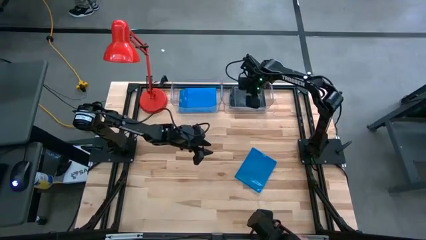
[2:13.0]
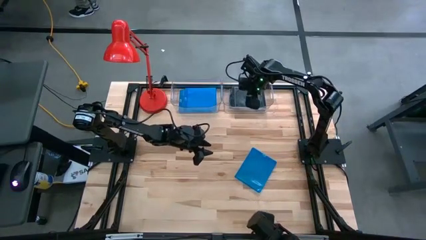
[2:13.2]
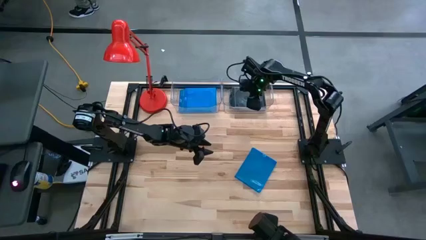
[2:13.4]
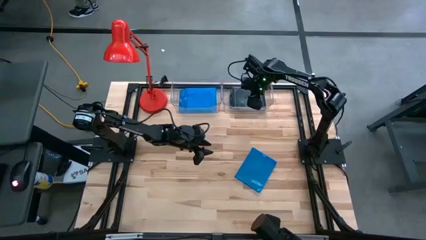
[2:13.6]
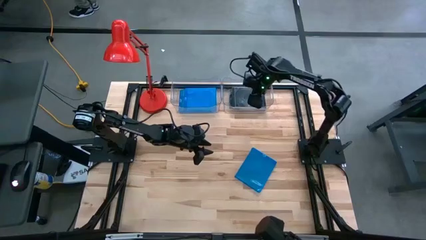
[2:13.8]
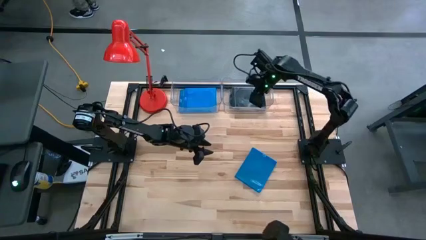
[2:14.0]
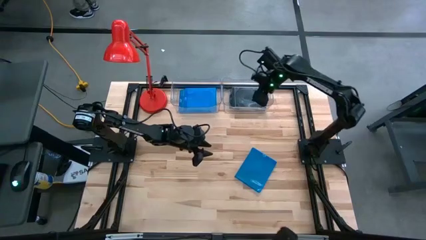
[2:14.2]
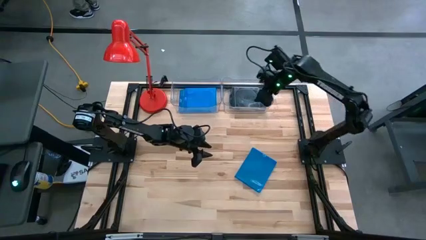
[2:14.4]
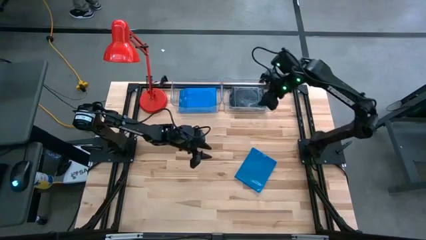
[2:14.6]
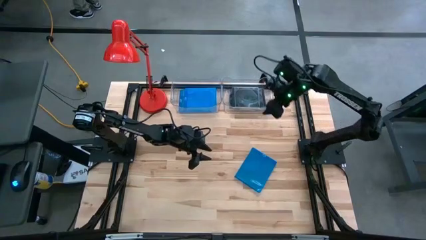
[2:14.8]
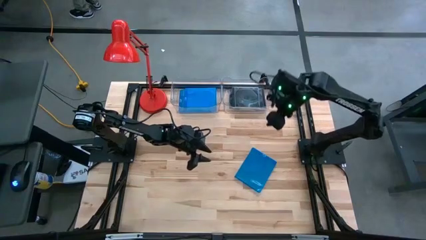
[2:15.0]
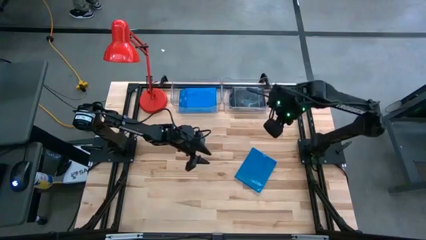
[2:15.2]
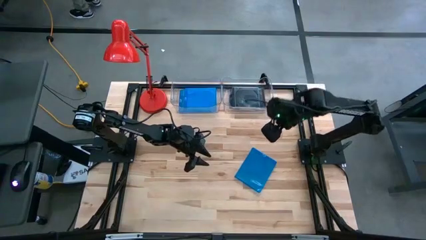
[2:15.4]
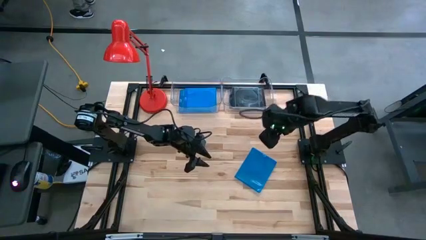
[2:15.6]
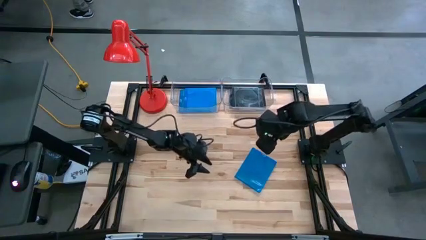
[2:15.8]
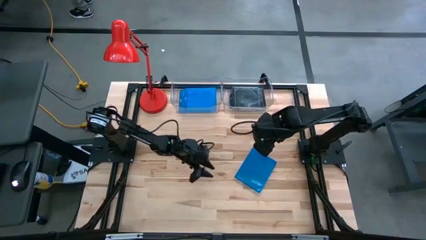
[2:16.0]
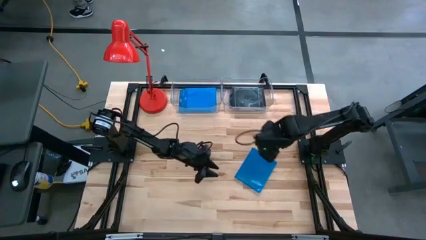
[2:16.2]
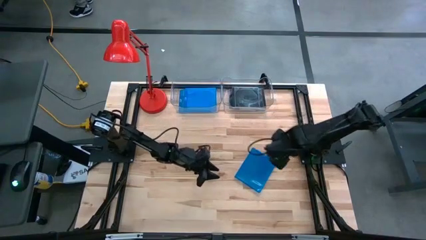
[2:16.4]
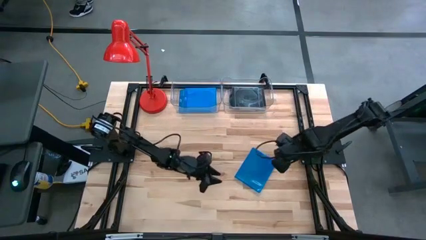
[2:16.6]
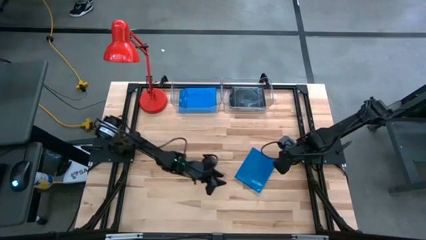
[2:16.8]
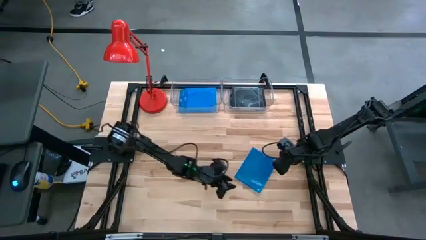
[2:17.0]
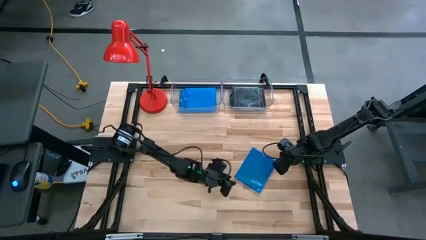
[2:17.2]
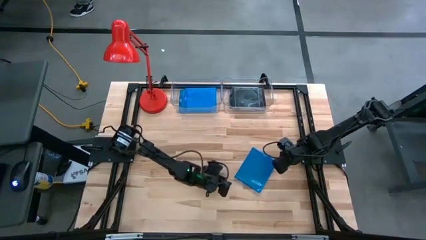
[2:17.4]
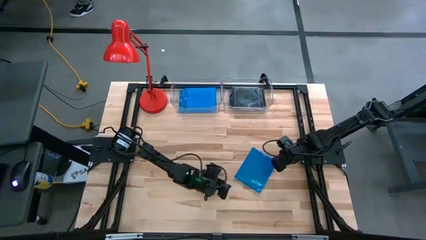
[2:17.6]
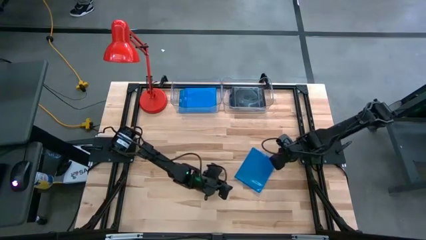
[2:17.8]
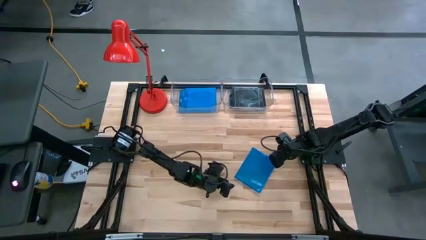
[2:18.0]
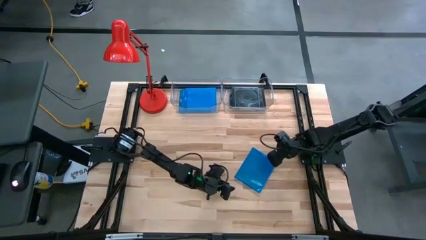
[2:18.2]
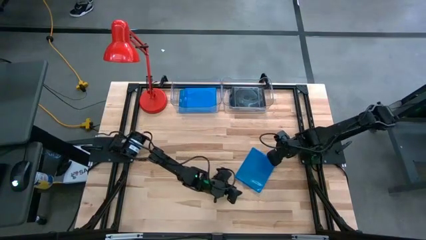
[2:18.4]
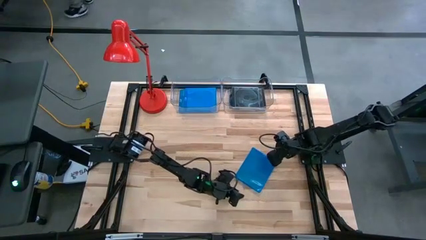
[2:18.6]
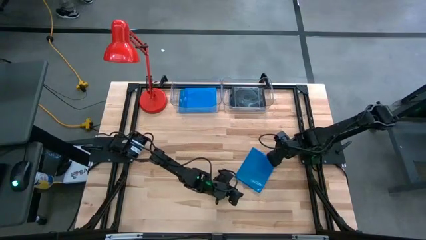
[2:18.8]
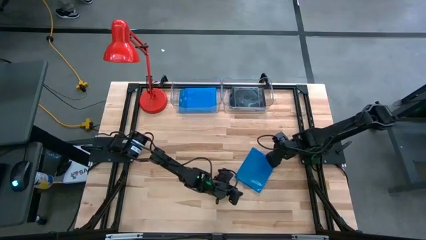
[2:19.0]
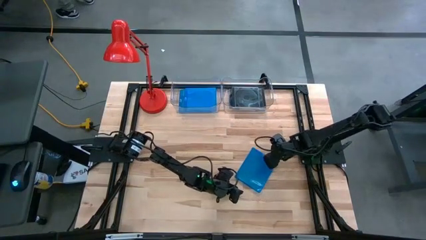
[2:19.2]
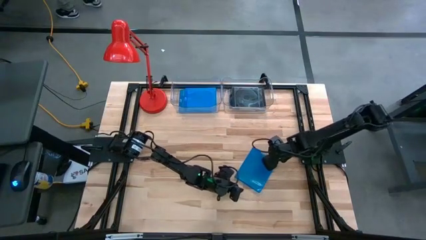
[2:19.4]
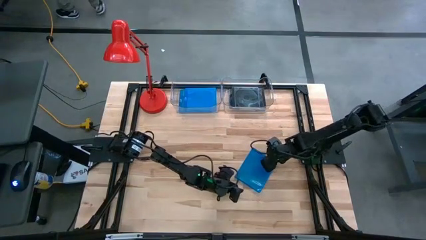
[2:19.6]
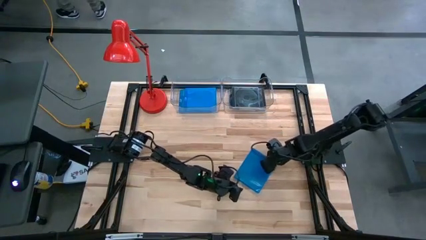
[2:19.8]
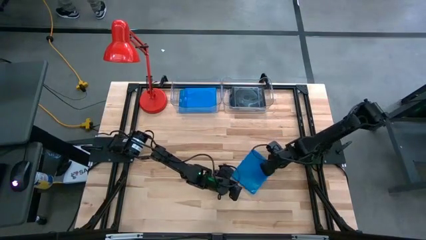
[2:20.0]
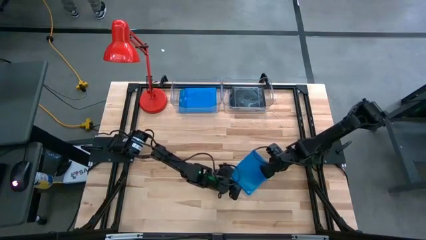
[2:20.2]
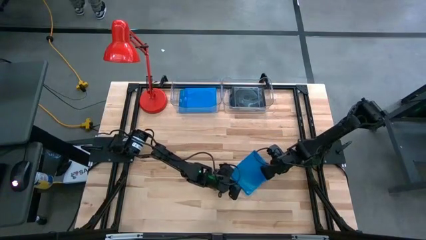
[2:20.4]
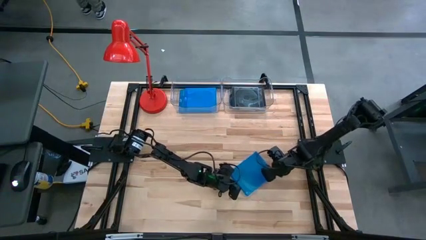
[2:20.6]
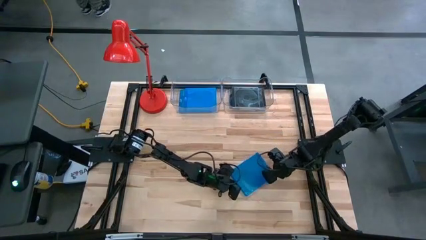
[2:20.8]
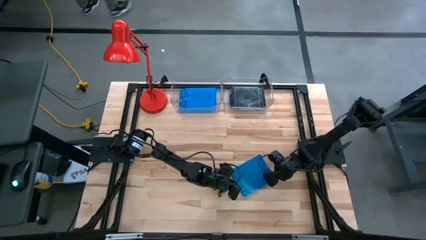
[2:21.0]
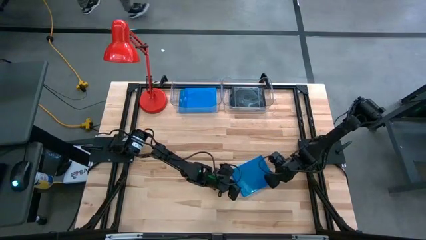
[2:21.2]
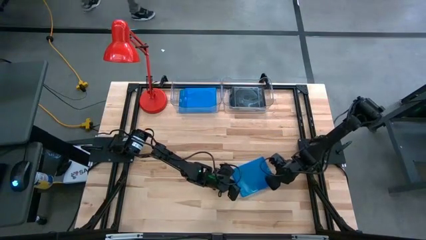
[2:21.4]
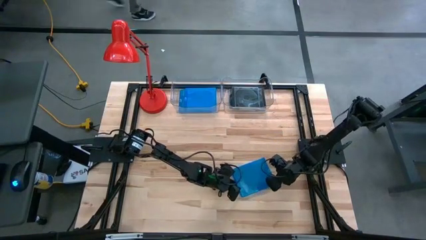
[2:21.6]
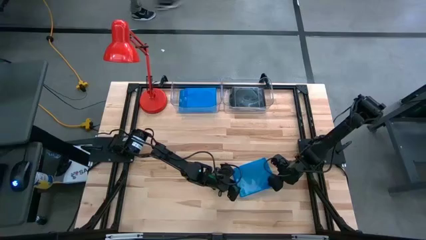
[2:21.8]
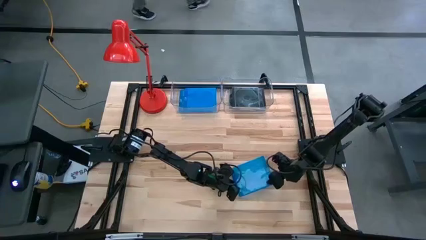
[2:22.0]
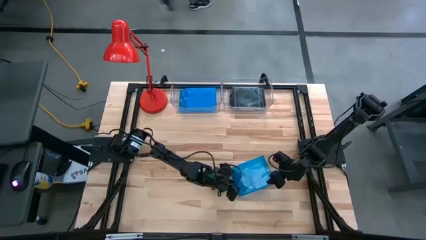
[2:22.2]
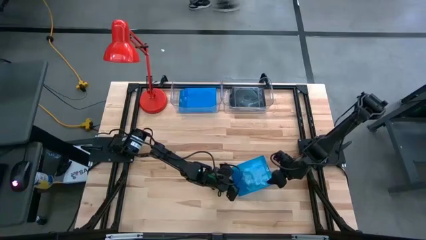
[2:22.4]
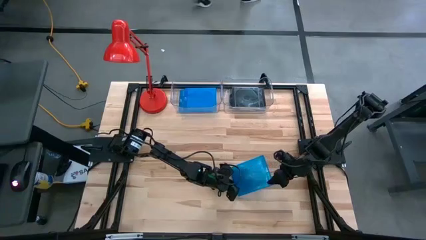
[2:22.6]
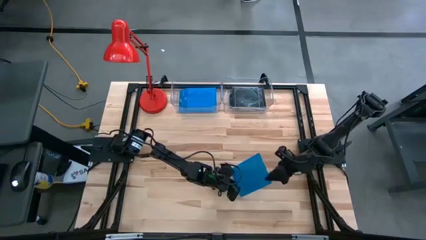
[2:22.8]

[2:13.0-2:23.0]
Task: Pick & place jewel cases by type
Put the blue cd case into the left transparent bin

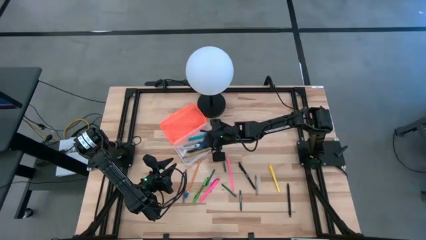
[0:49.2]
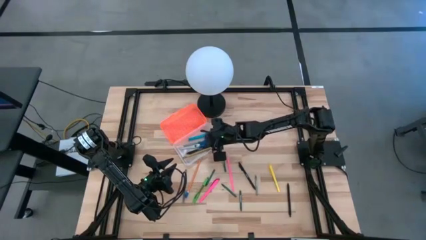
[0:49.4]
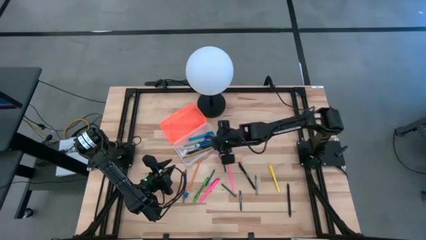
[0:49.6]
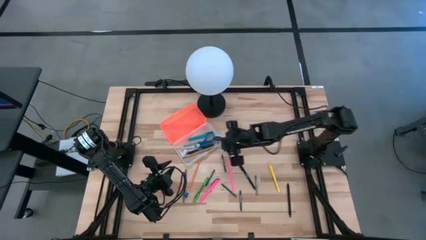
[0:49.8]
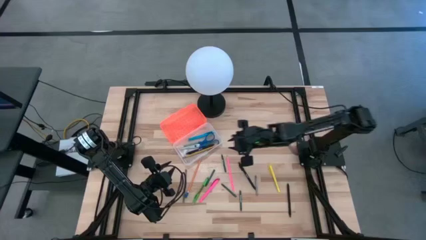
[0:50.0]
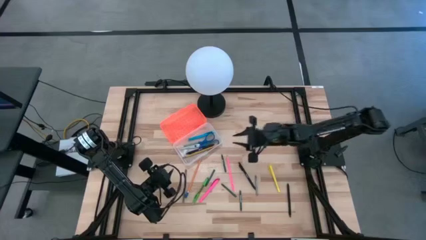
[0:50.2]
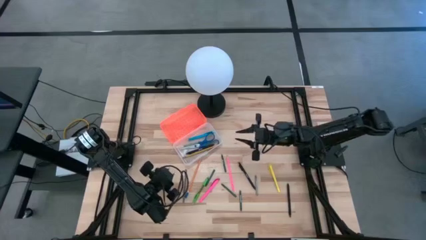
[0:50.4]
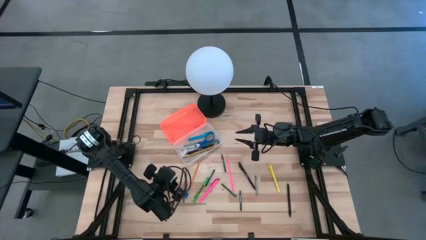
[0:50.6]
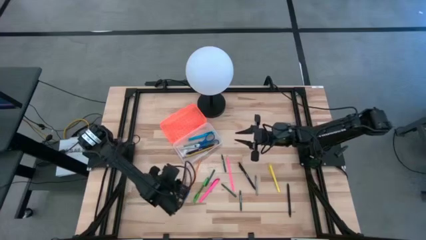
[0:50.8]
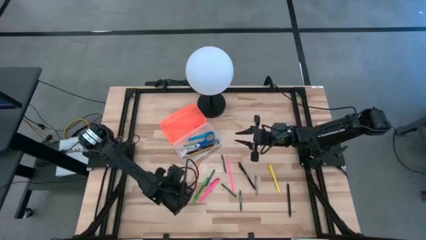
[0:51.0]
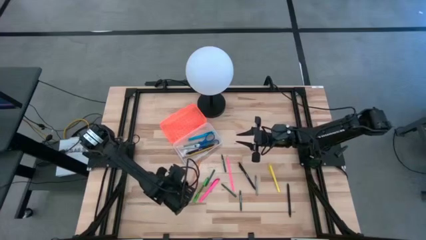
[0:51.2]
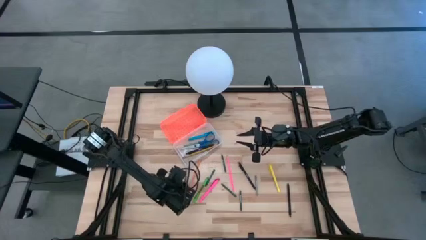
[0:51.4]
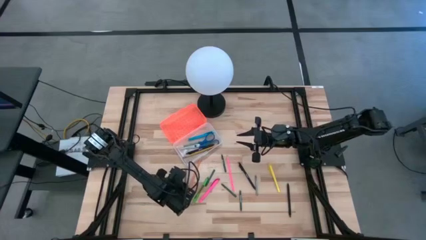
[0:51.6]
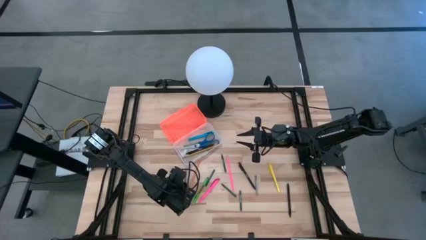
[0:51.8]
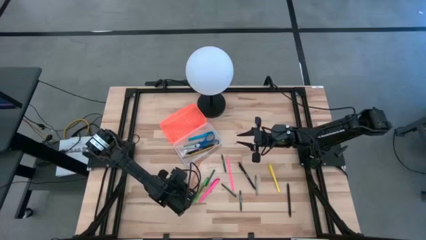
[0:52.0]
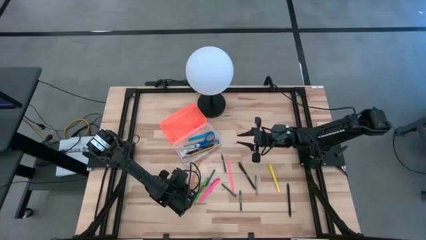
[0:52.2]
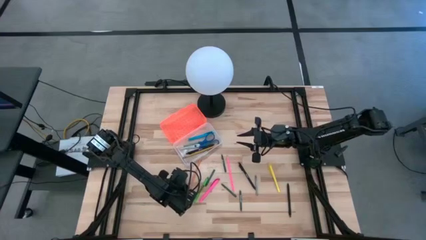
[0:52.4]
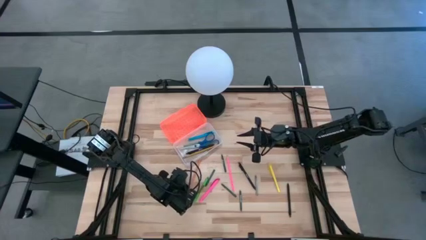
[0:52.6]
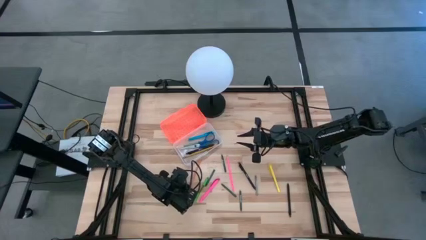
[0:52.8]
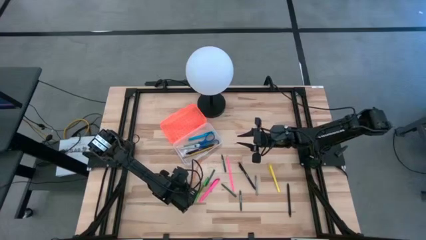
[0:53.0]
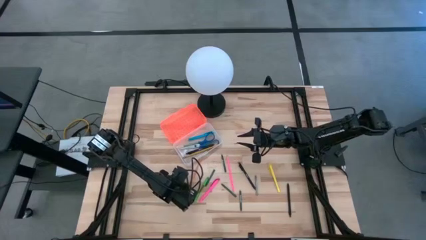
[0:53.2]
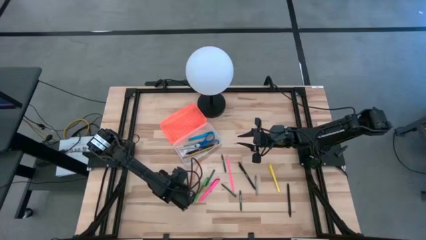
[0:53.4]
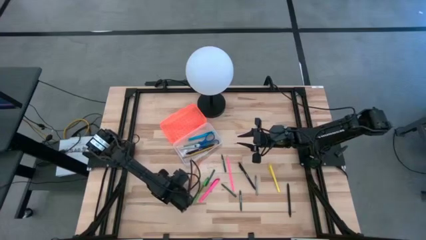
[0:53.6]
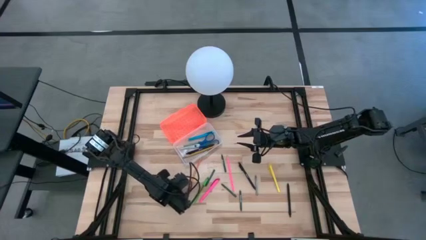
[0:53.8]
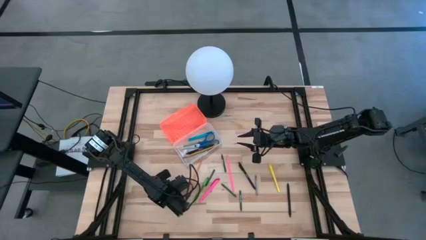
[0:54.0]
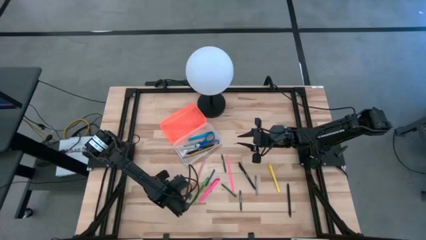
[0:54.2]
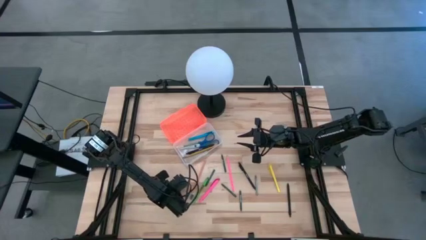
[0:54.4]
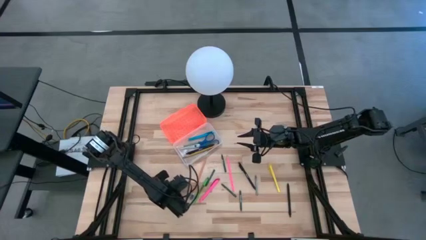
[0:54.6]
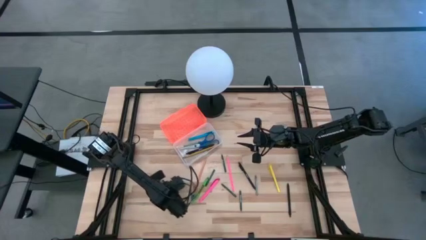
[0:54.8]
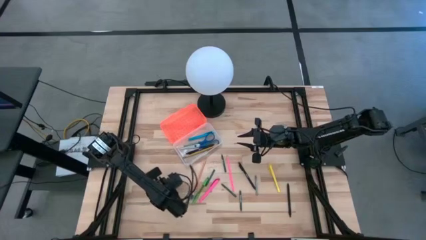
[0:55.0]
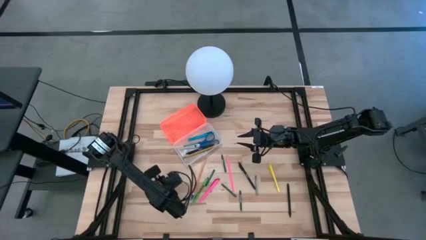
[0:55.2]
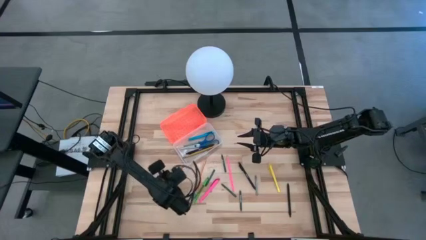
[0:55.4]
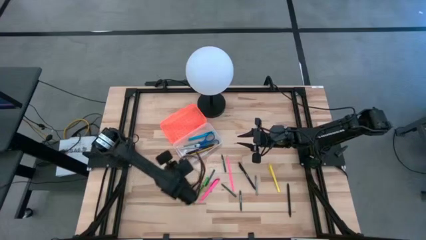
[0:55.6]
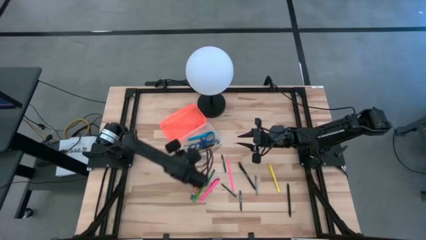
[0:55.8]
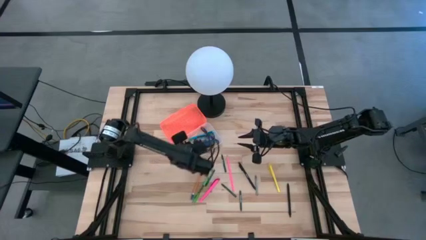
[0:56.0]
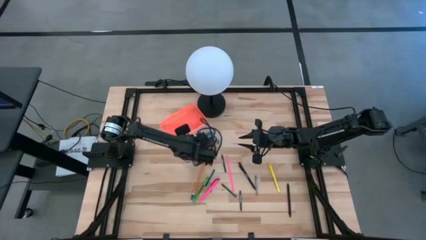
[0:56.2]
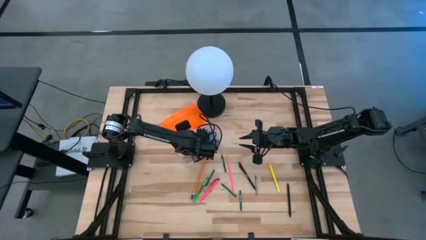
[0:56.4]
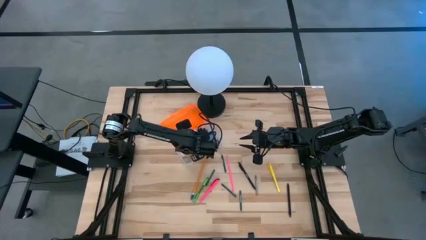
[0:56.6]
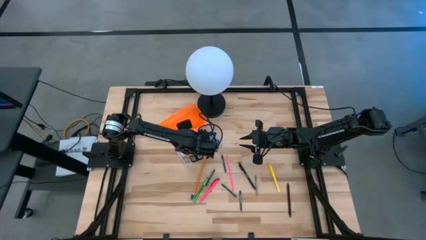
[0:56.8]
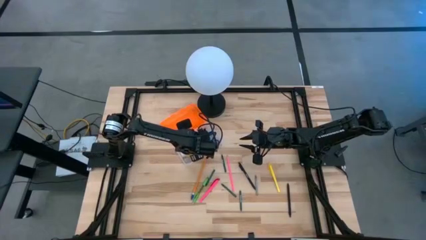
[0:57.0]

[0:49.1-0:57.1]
Task: Pick & place school supplies into a supply box
Put the gray pen into the orange supply box
